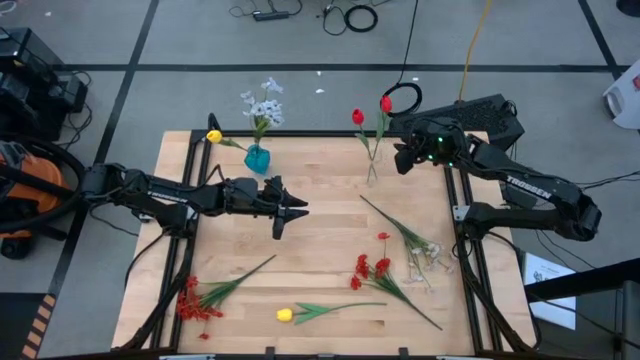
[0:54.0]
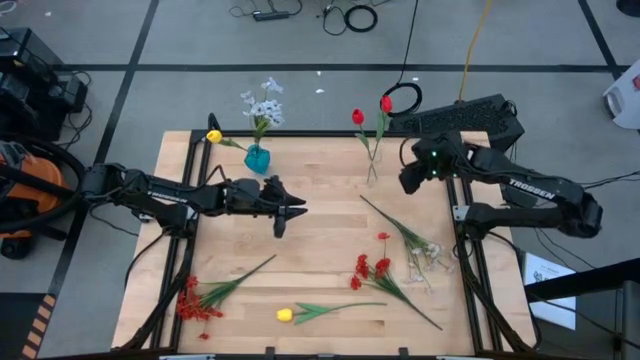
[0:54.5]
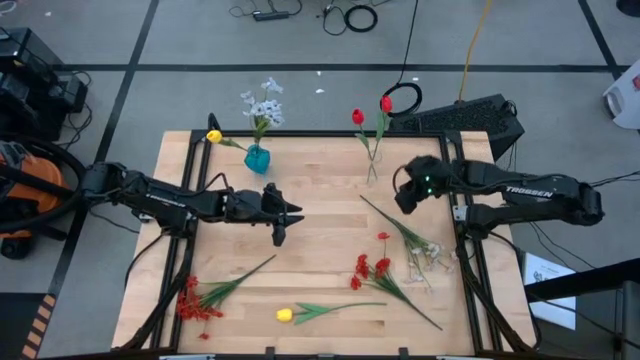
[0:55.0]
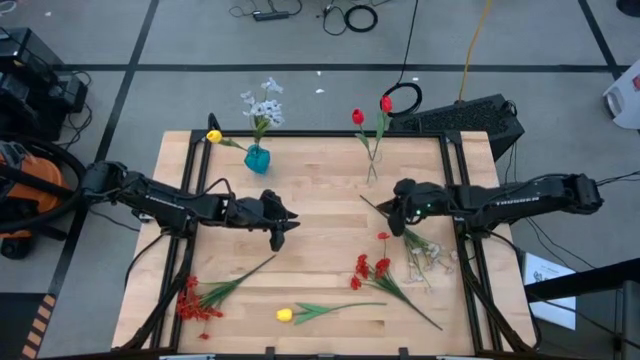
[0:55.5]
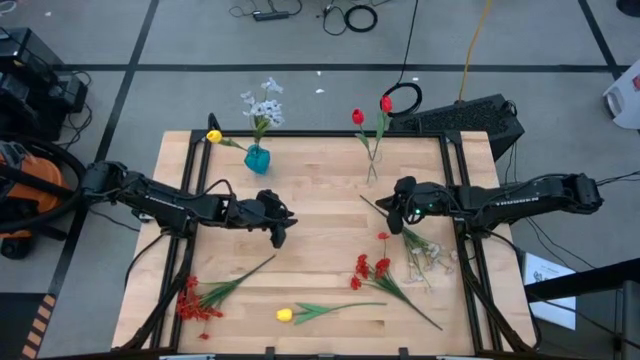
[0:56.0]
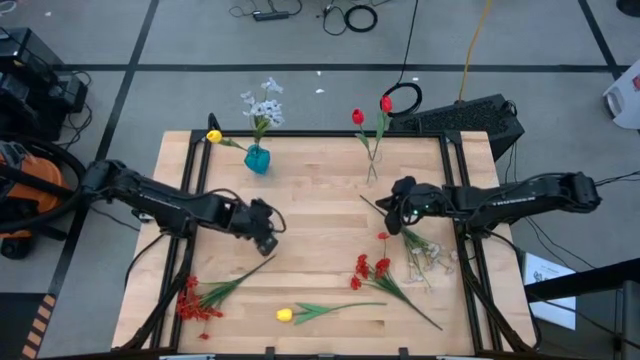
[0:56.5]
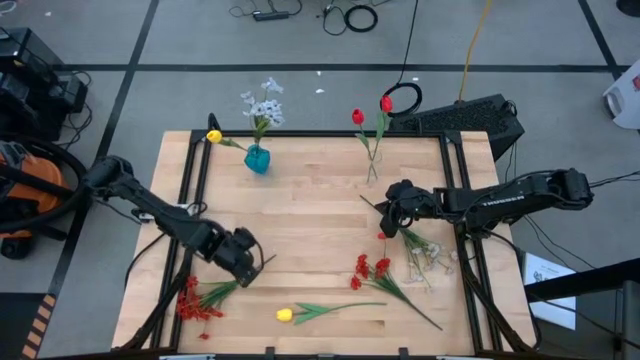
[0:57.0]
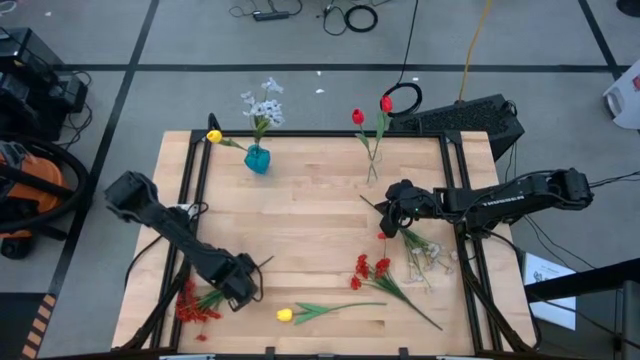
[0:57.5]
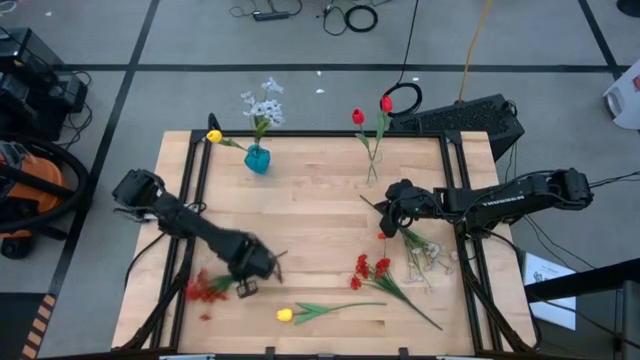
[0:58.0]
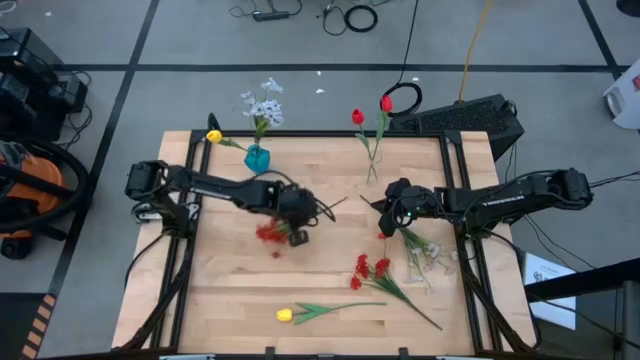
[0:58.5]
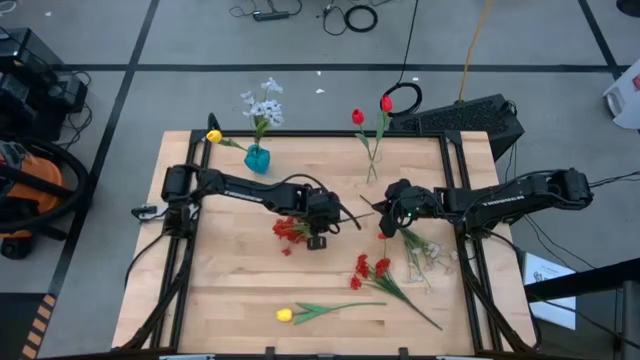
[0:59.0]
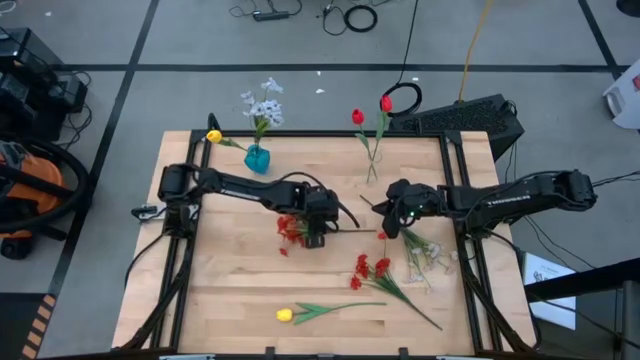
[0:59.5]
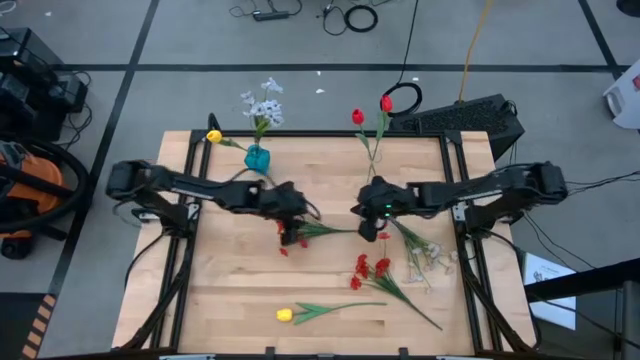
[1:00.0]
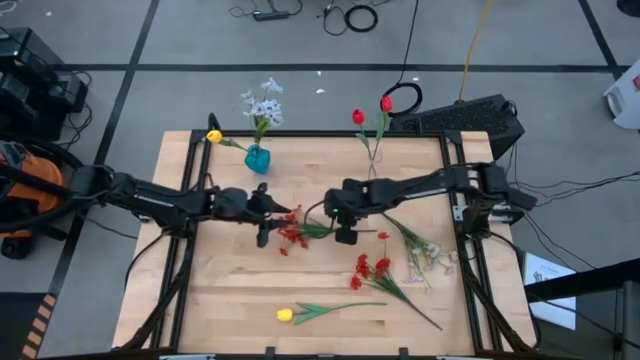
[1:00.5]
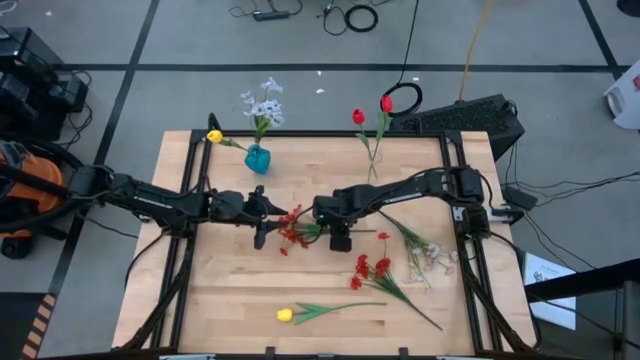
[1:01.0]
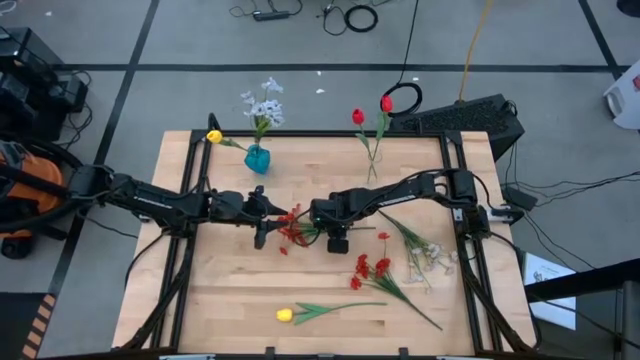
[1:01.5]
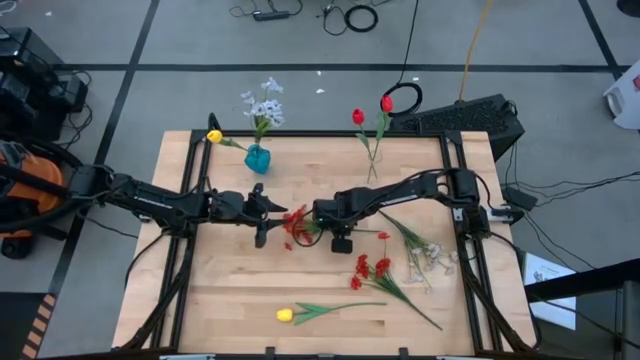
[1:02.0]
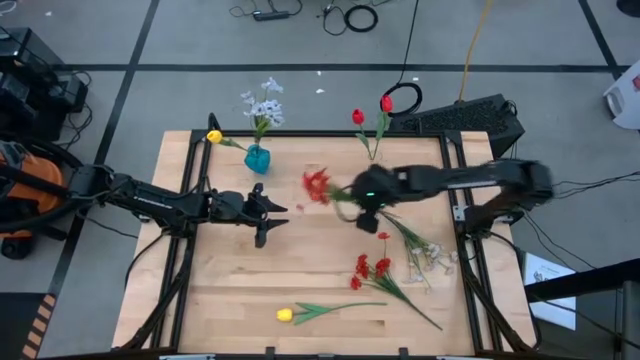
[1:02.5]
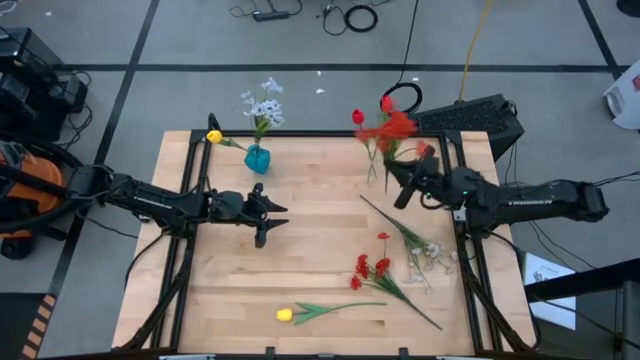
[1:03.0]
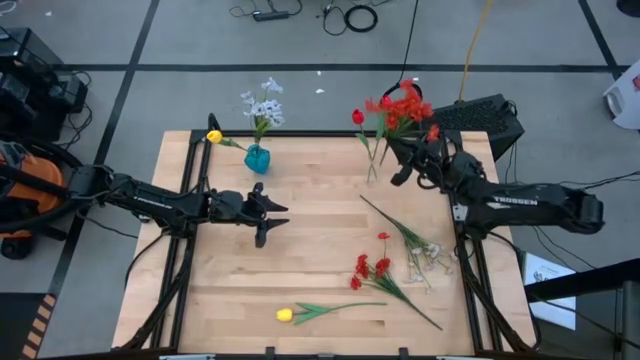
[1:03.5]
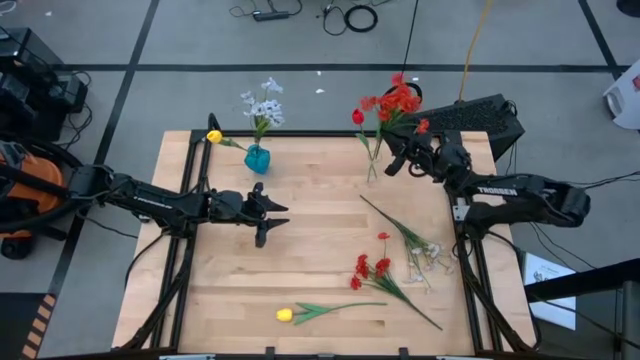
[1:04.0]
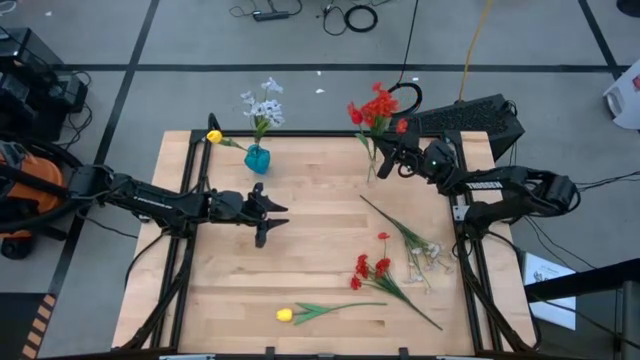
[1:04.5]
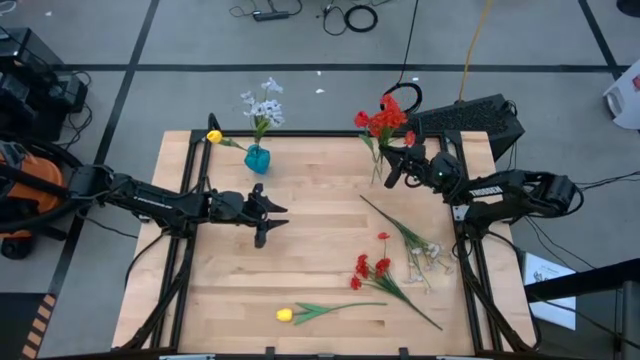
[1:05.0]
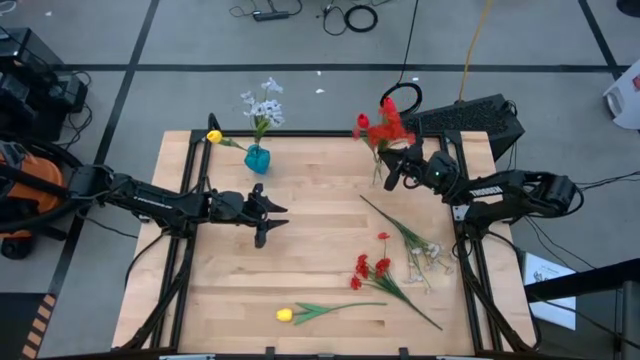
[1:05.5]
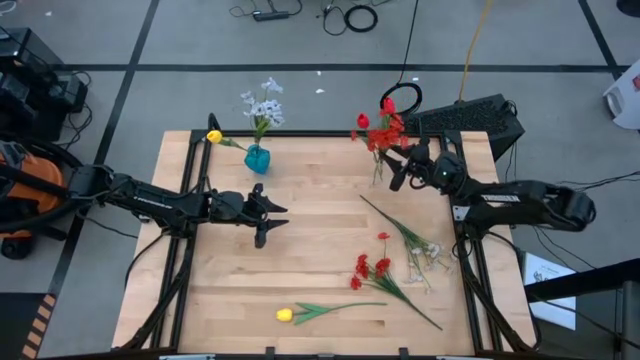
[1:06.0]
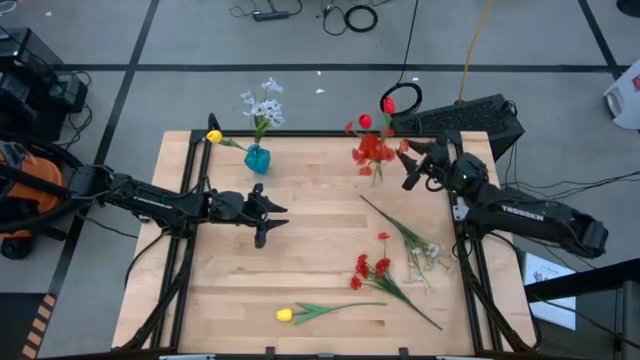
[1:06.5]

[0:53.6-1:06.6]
Task: Sort flowers into vase by color
Put the left red flowers into the transparent vase

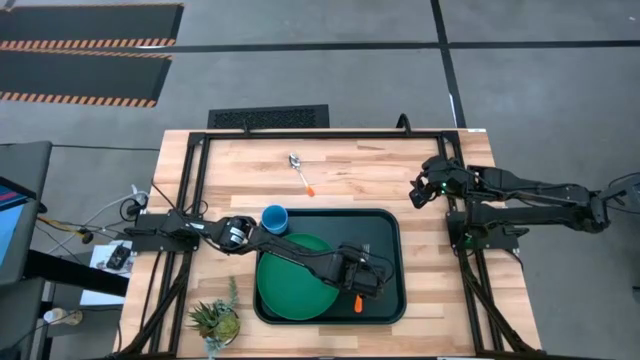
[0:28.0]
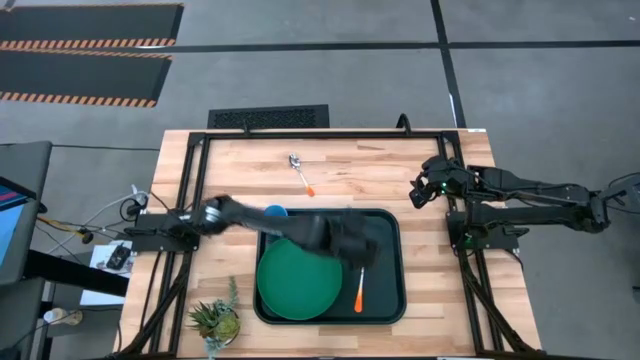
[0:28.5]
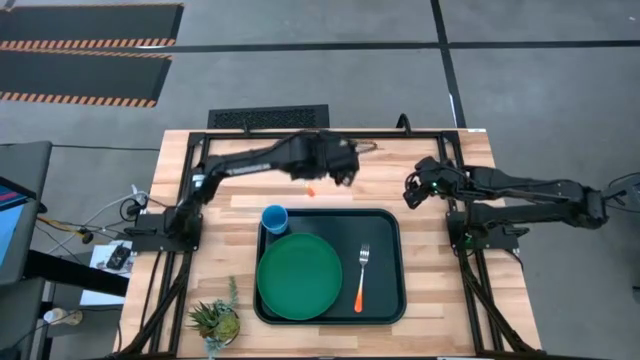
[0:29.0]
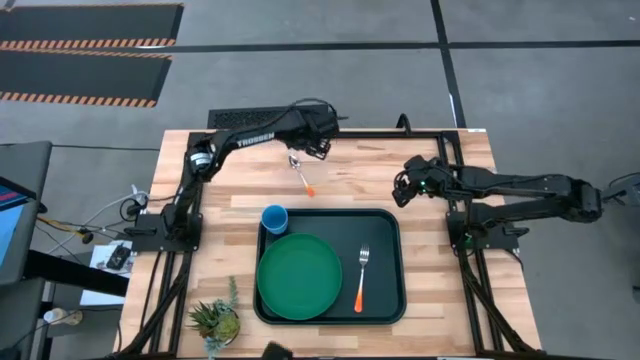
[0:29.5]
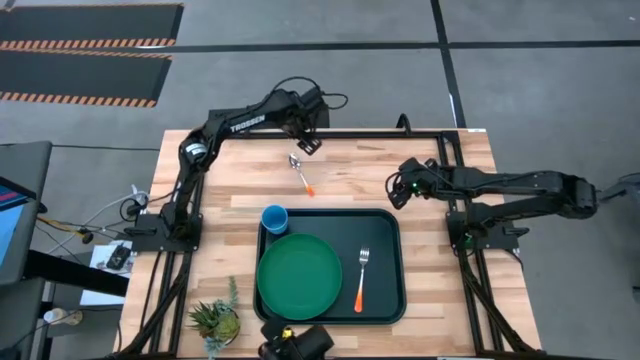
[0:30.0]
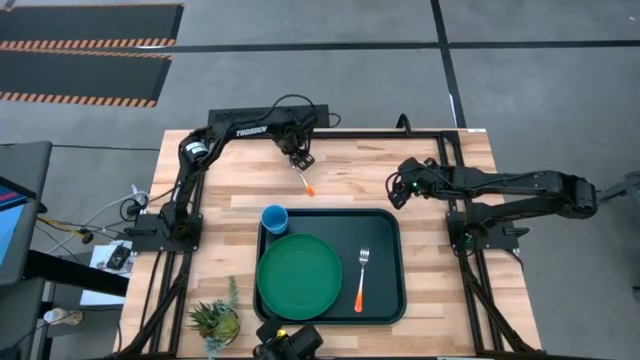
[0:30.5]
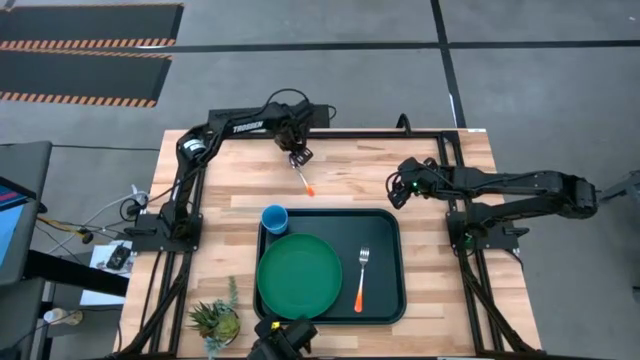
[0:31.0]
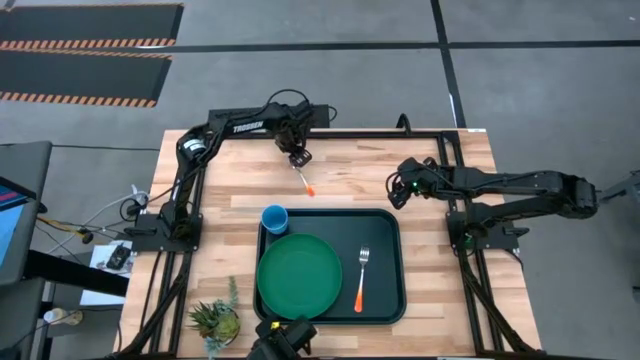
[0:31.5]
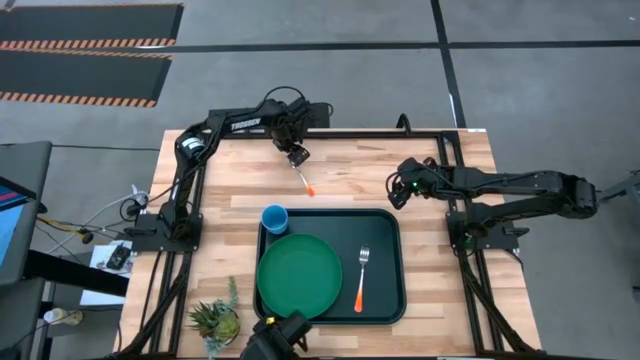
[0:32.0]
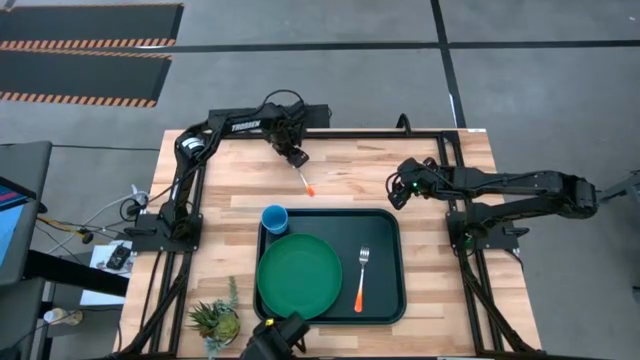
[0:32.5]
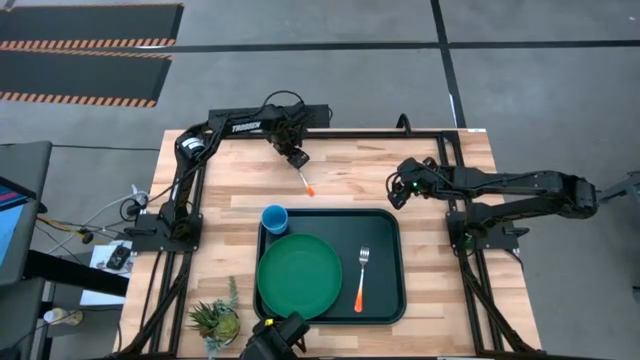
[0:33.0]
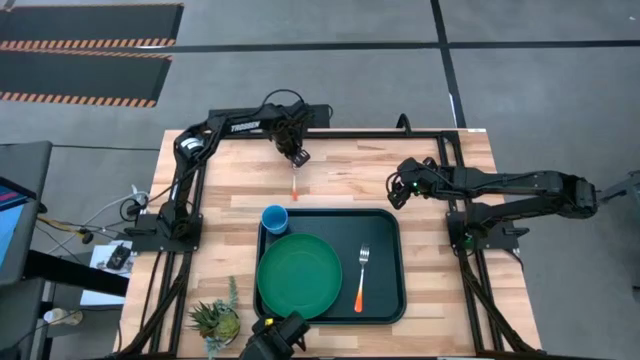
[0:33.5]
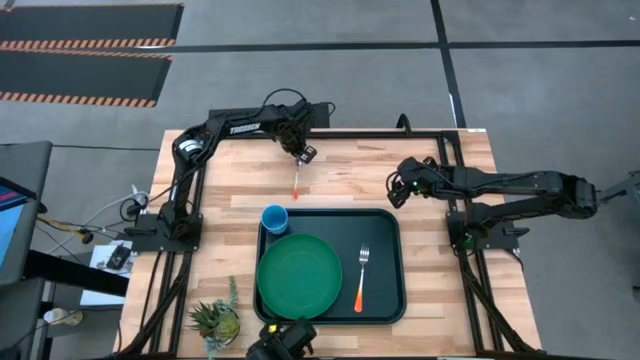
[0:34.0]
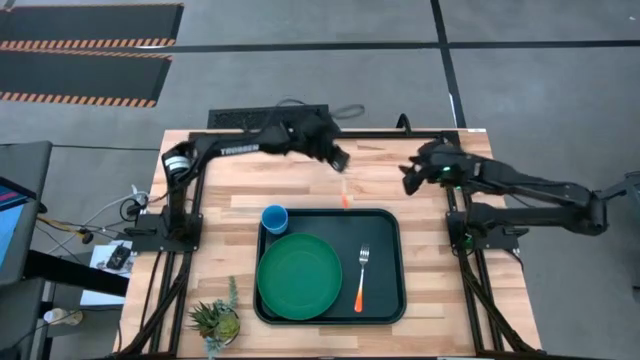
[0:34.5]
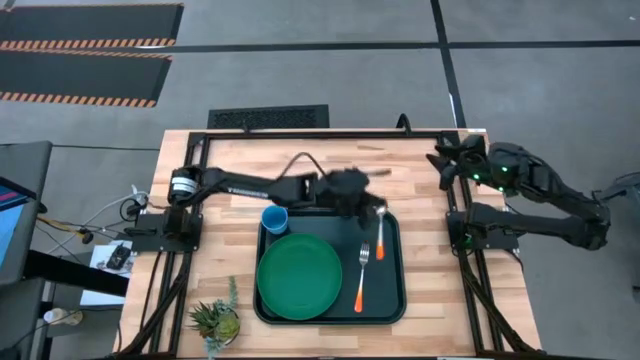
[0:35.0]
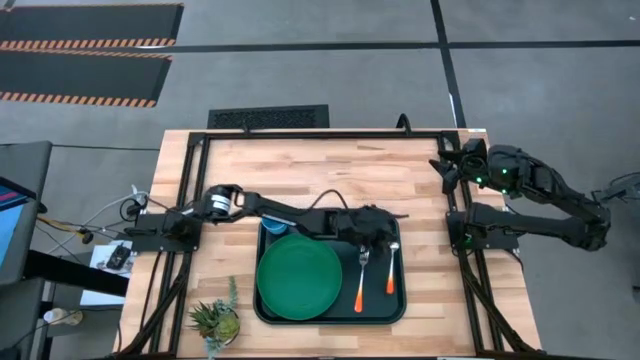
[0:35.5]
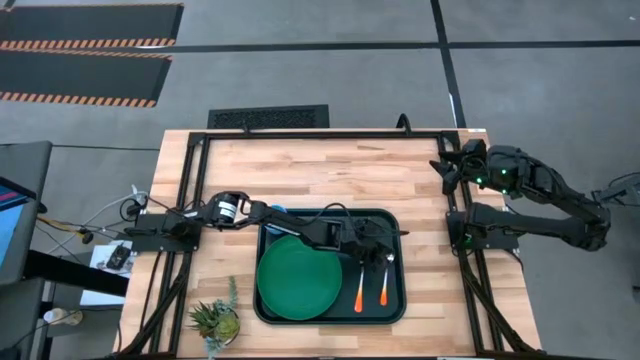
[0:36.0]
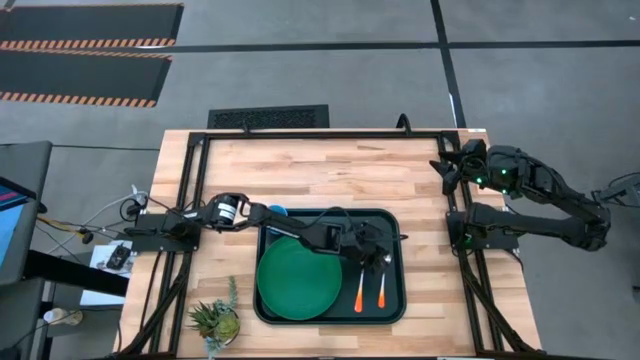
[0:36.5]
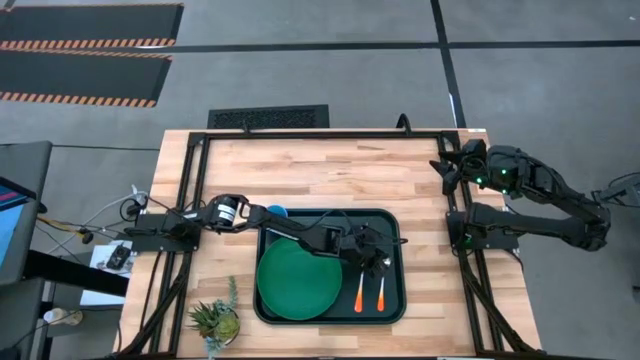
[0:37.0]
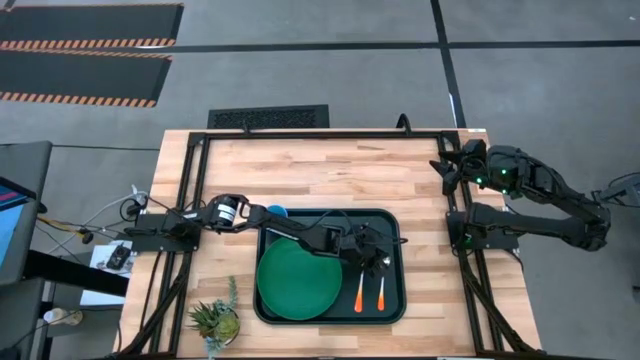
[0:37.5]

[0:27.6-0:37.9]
Task: Pick and place plate/cup/fork/spoon on tray
Put the orange spoon on the black tray to the right of the orange fork
